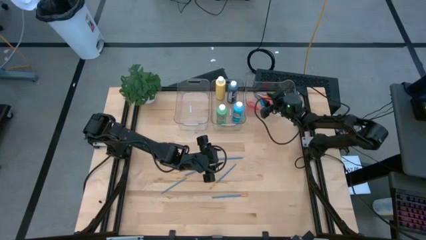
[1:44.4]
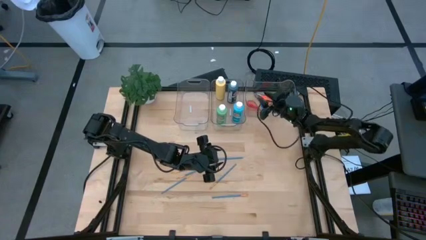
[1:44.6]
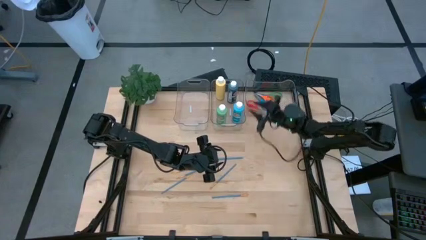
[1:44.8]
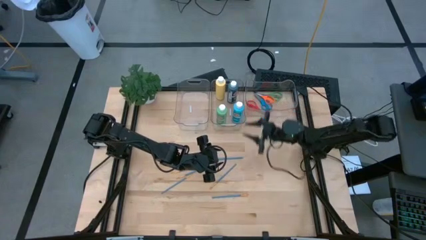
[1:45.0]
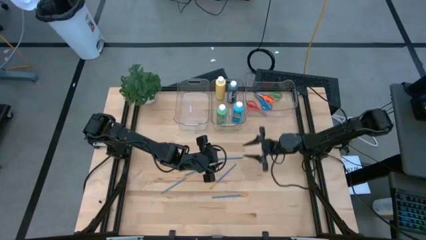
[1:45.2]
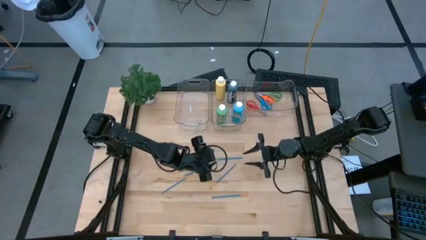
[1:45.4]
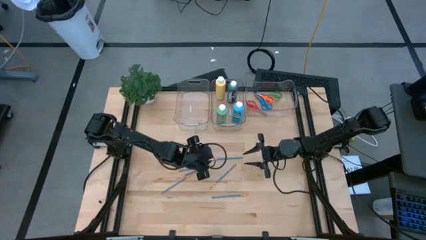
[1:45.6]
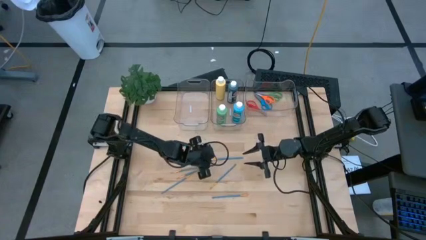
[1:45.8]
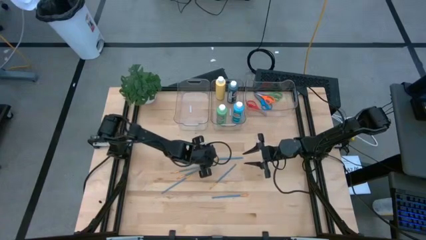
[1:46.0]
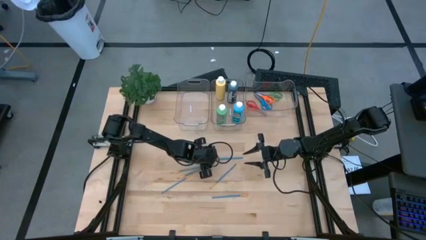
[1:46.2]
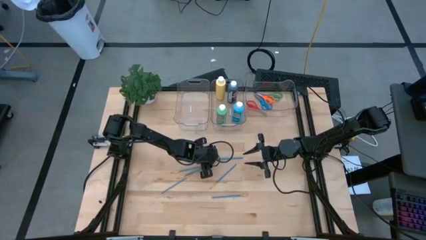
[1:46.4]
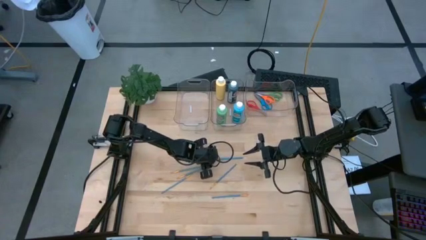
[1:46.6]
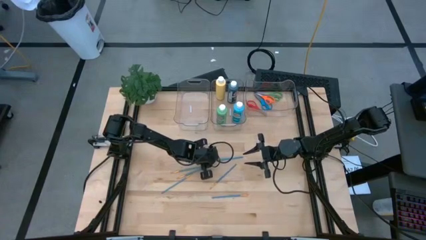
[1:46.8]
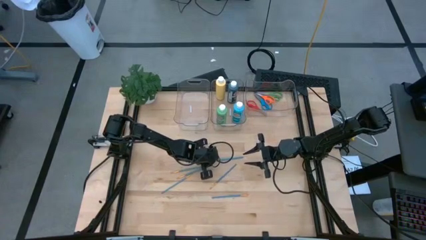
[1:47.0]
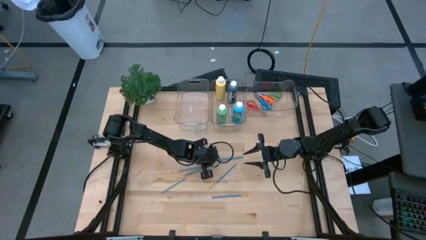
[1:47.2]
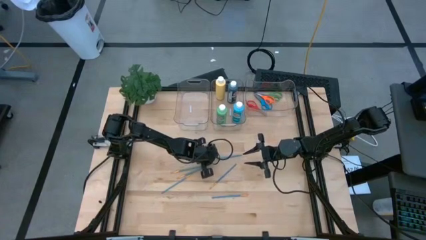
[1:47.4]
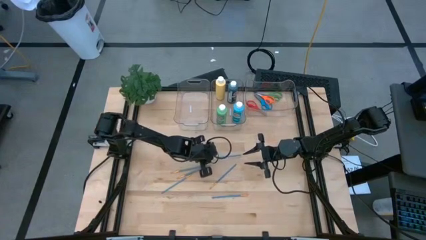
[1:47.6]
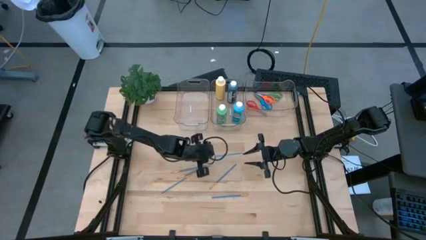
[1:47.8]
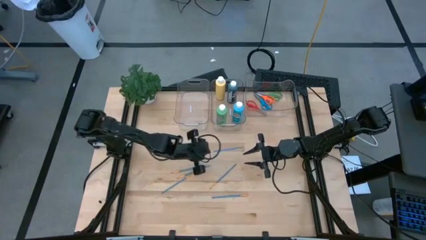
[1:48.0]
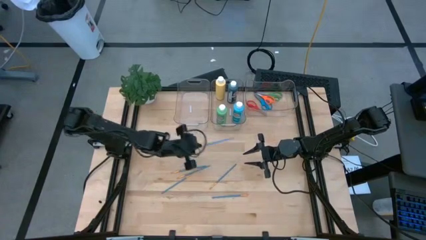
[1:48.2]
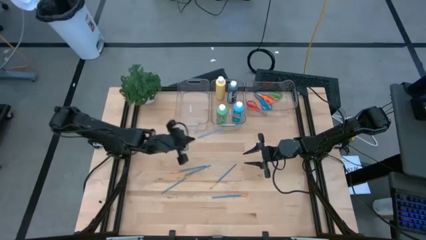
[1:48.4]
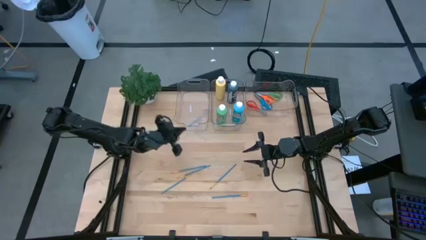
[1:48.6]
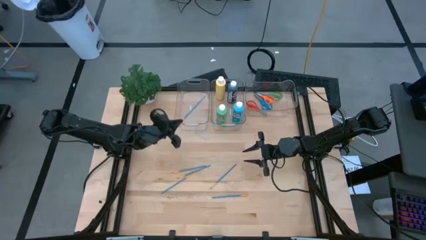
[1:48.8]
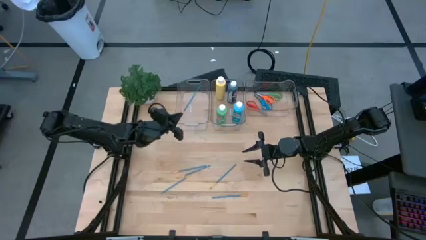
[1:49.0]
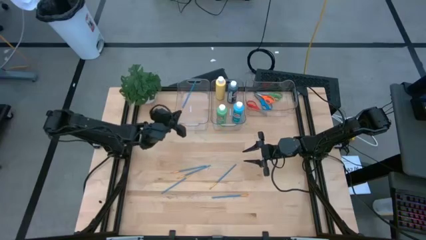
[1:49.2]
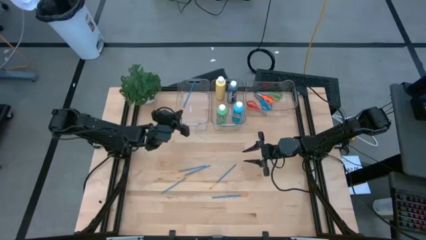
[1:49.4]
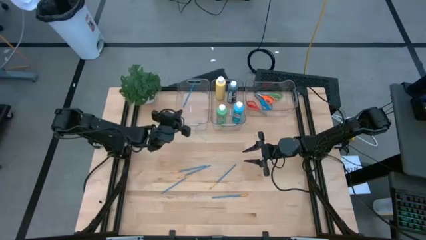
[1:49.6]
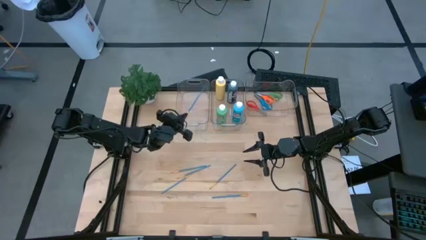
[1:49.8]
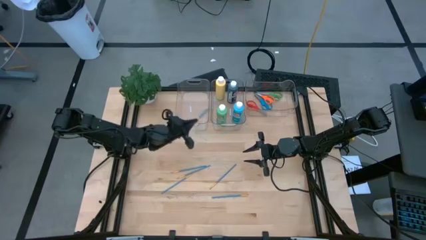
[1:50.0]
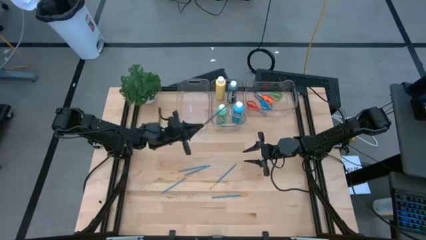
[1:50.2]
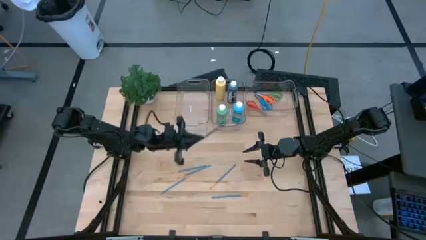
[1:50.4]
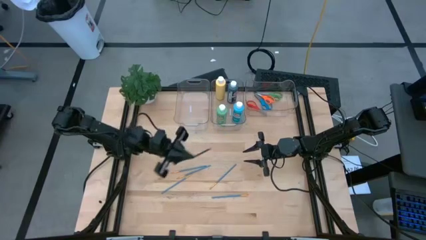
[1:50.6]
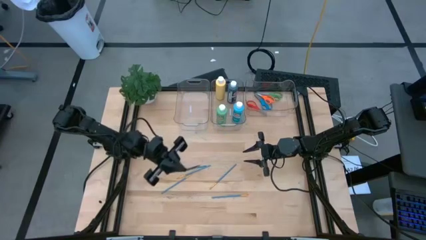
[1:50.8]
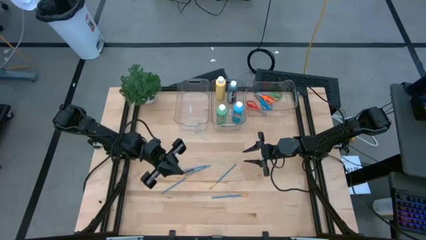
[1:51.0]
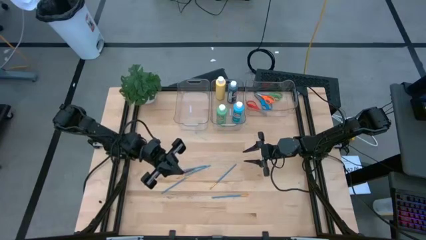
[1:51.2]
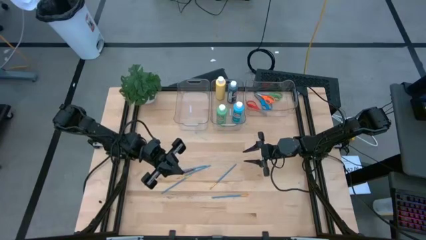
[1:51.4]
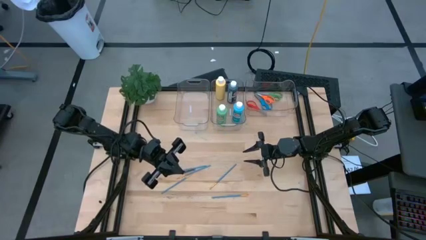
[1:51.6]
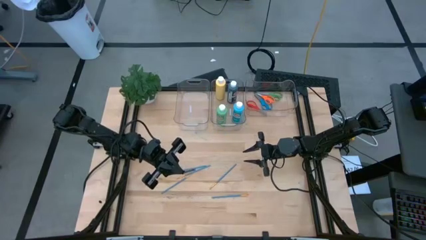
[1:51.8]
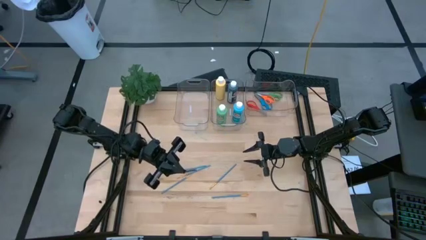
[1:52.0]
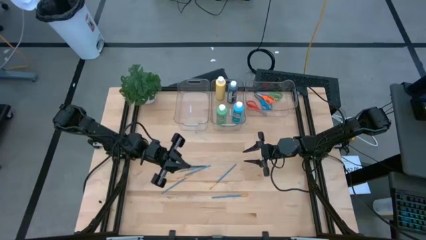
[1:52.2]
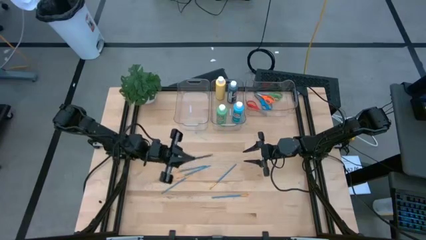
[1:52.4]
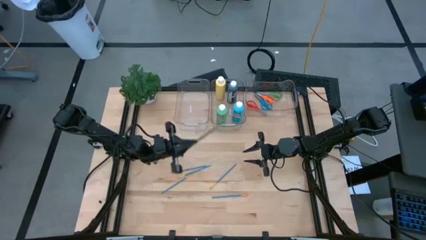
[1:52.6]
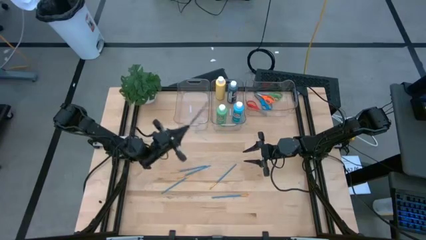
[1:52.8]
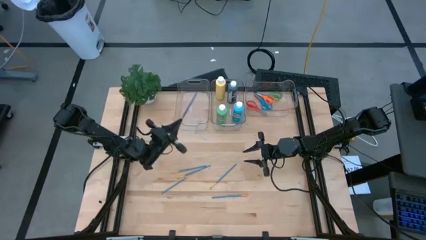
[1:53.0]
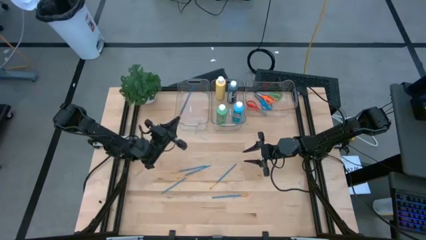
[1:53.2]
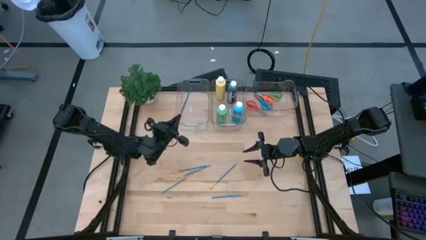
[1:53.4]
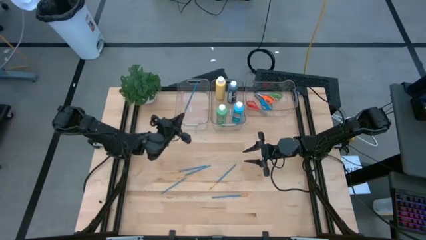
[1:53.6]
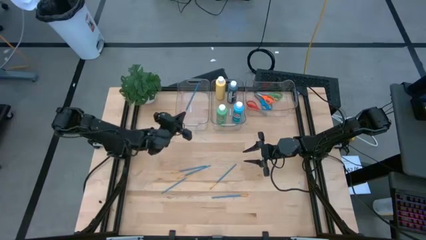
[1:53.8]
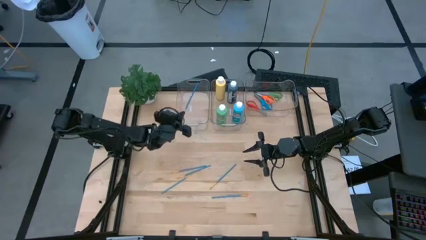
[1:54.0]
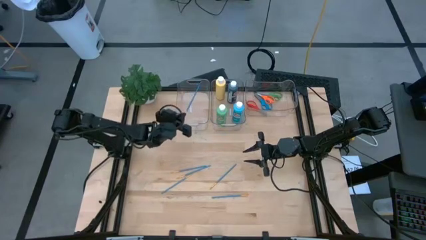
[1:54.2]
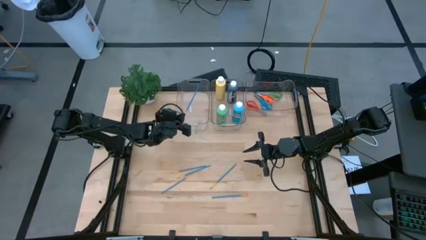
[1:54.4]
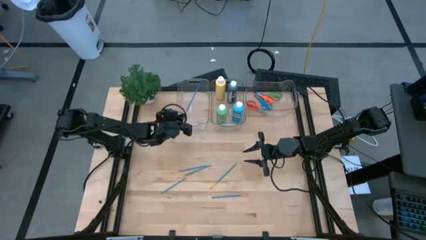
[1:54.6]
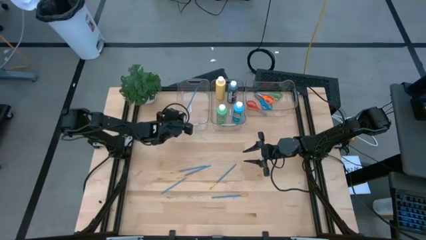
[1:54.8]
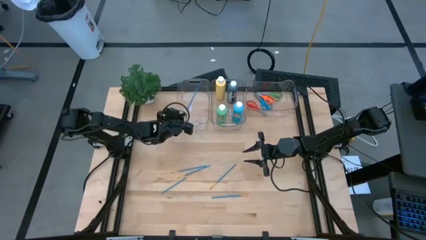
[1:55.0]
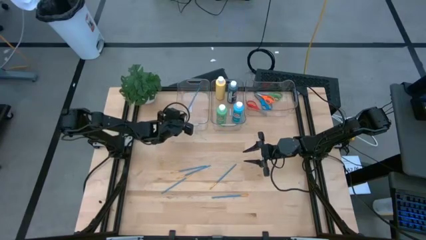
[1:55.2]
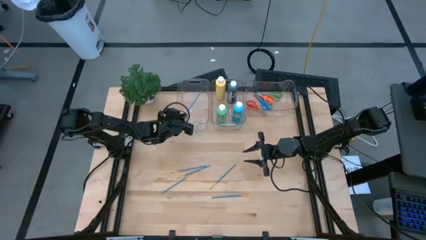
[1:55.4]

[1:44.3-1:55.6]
Task: Pick & Place Paint Supplies
Put the blue paint brush into the left transparent bin

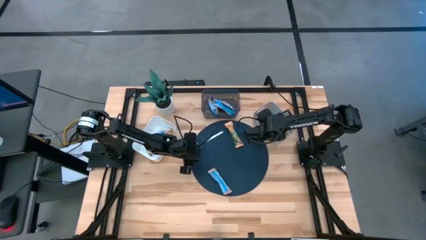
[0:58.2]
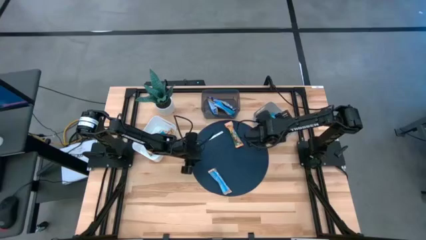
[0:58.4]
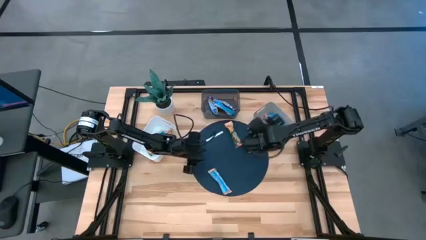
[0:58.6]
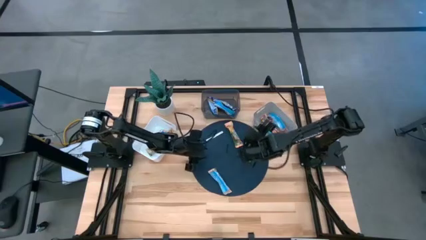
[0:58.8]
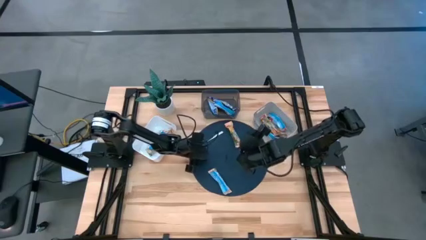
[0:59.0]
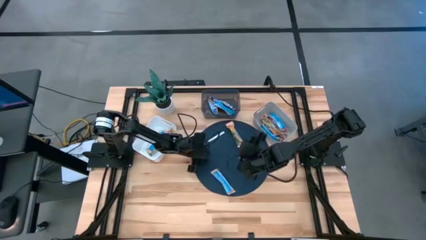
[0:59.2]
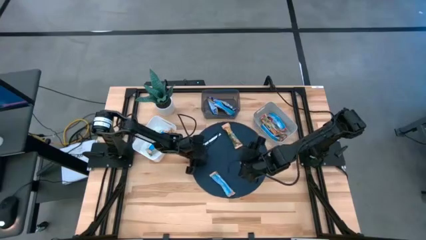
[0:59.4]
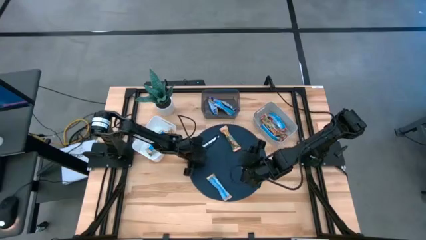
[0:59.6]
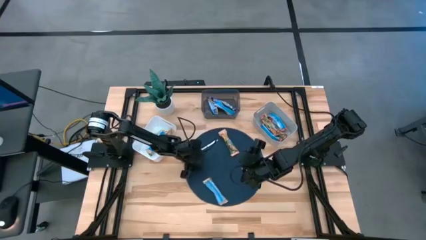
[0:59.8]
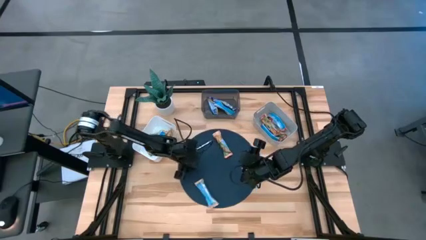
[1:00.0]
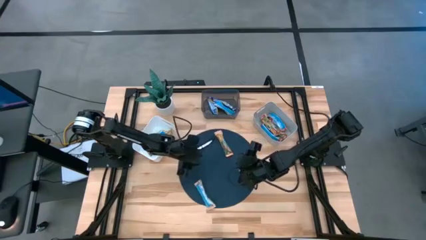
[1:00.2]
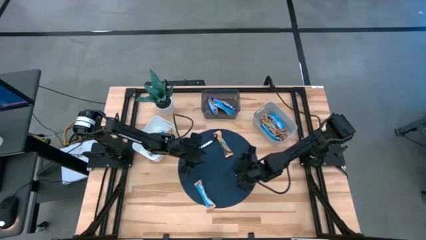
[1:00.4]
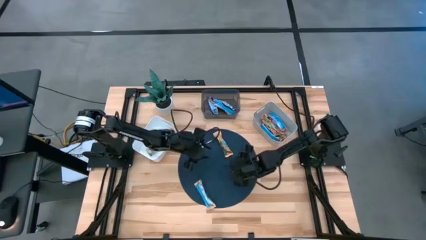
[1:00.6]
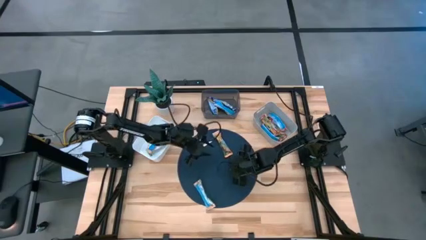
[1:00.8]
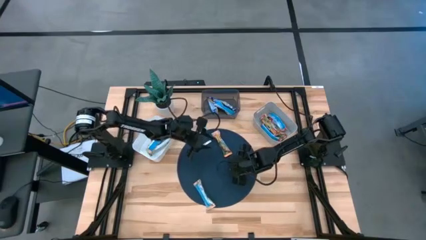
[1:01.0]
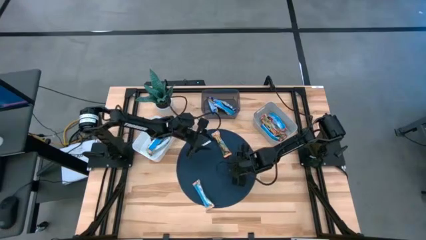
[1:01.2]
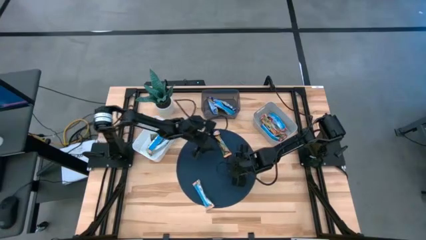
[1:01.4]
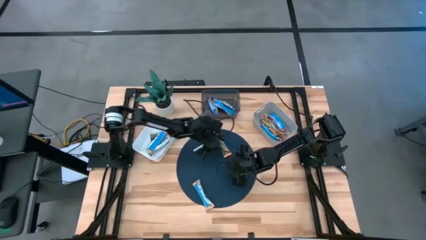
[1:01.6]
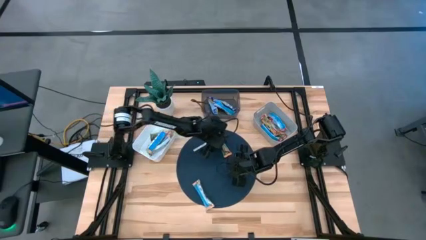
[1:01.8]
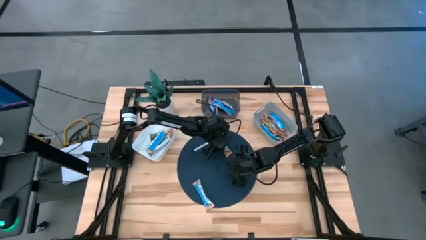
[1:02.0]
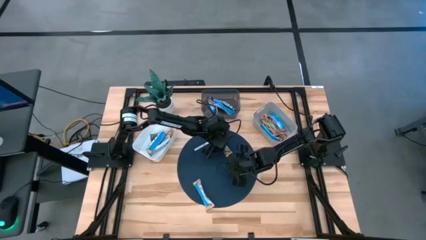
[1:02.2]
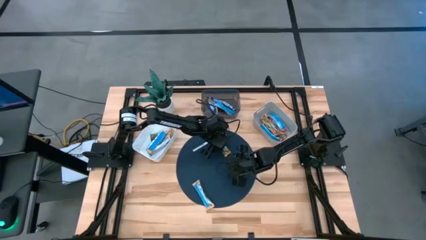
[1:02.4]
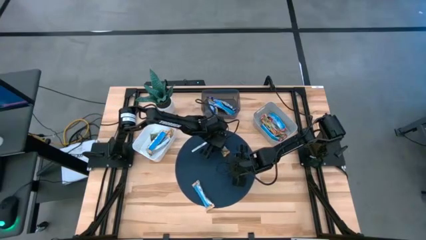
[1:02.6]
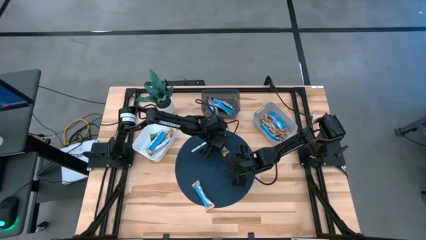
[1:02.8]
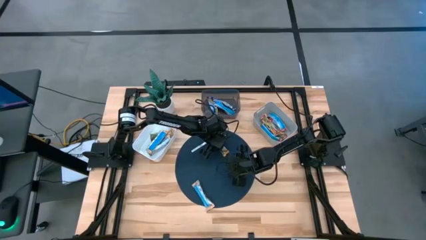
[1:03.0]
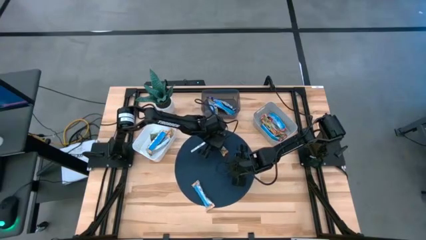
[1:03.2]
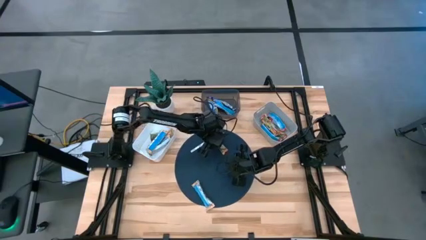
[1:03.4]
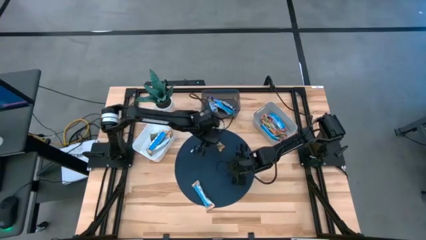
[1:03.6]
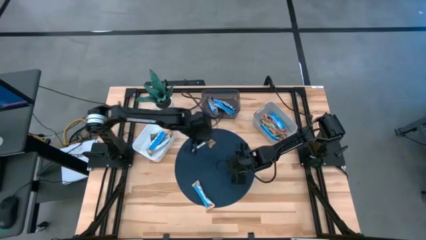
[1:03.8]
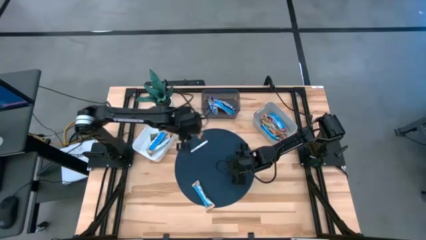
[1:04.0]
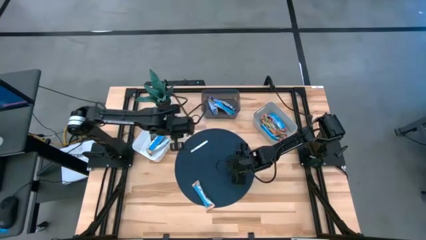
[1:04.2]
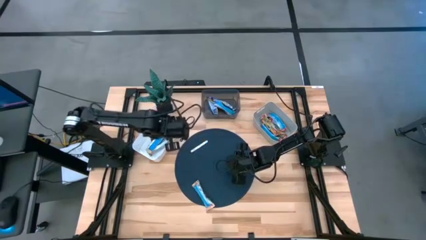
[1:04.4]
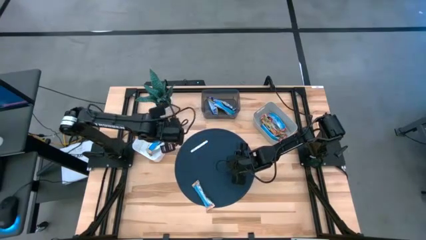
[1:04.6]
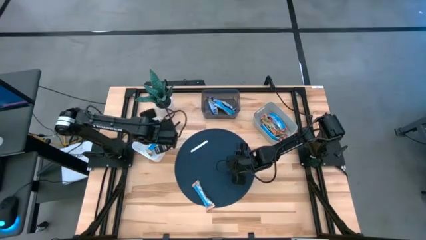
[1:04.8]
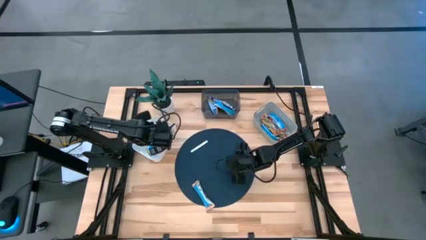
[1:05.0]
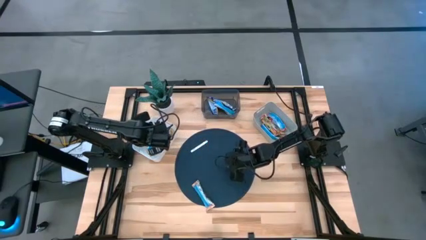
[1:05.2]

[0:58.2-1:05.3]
Task: Pick and place Granola Bars by type
Put the yellow granola bar into the white bin
